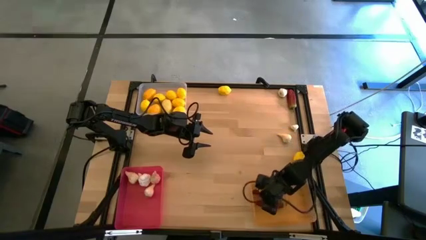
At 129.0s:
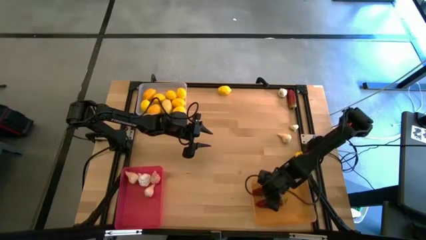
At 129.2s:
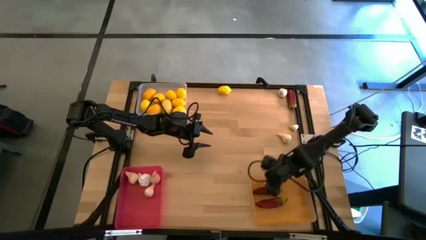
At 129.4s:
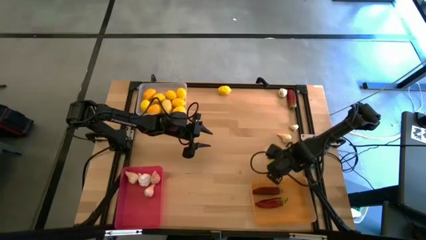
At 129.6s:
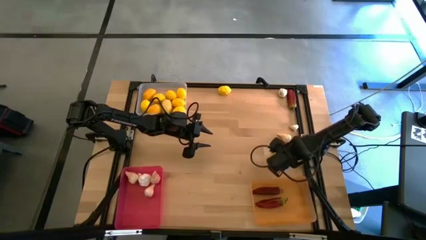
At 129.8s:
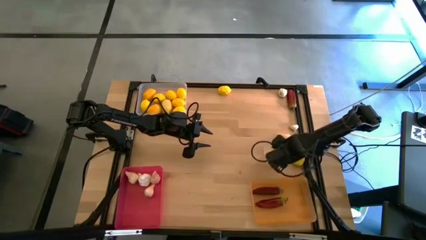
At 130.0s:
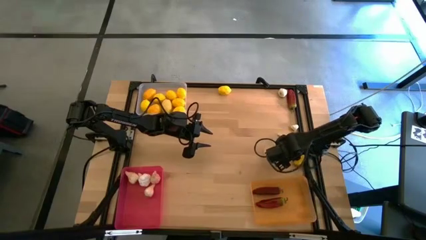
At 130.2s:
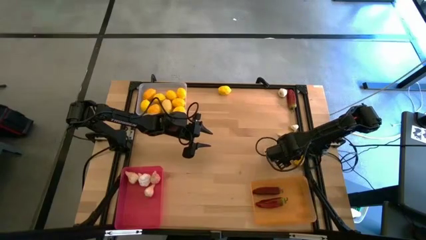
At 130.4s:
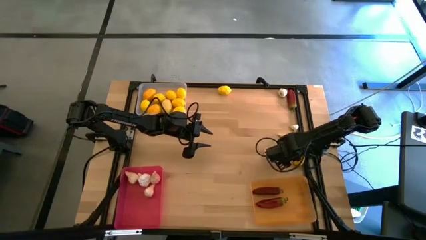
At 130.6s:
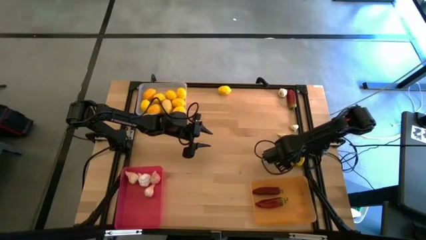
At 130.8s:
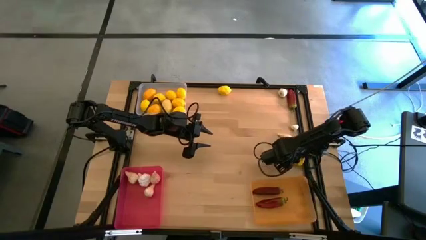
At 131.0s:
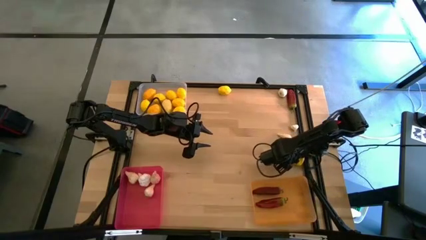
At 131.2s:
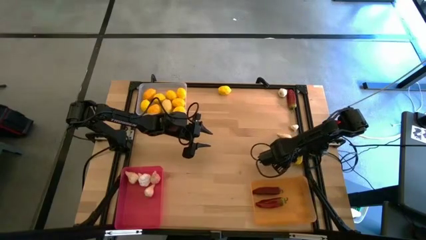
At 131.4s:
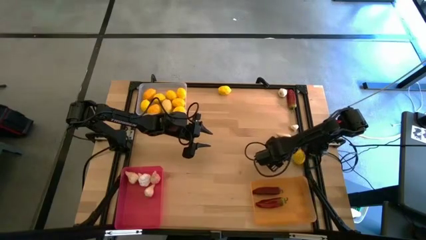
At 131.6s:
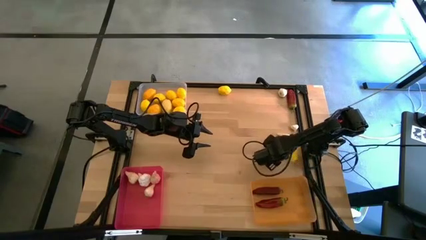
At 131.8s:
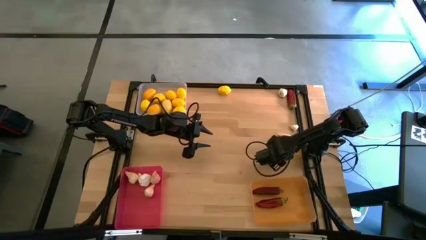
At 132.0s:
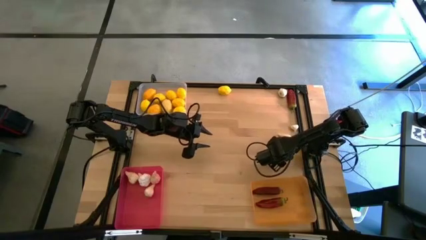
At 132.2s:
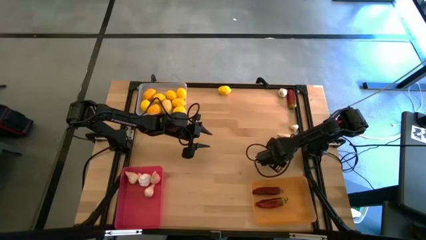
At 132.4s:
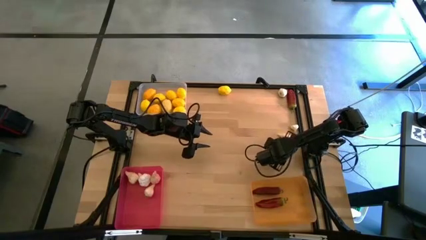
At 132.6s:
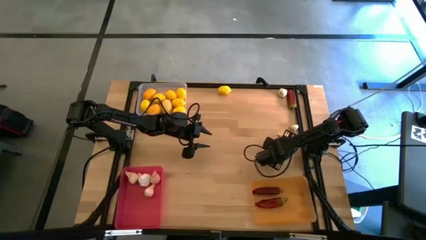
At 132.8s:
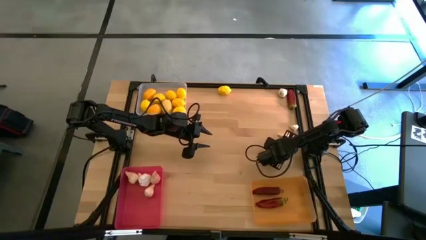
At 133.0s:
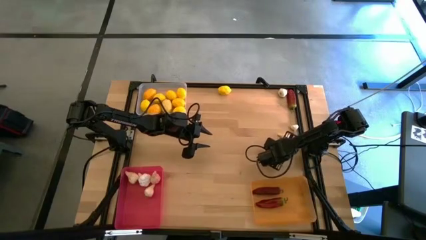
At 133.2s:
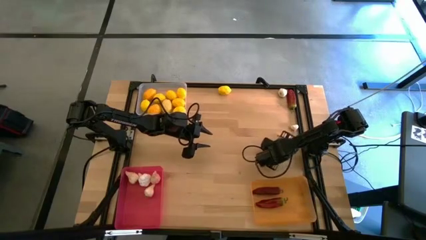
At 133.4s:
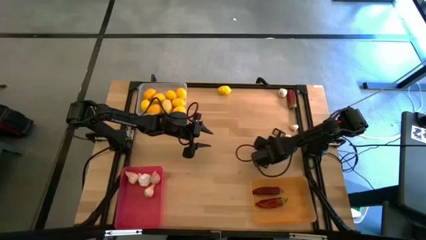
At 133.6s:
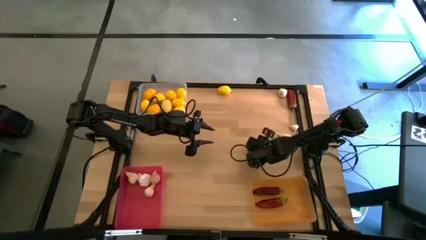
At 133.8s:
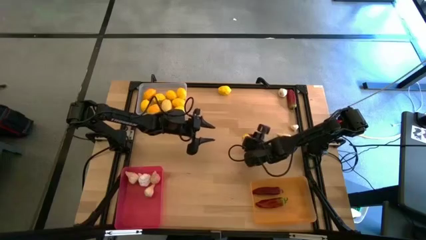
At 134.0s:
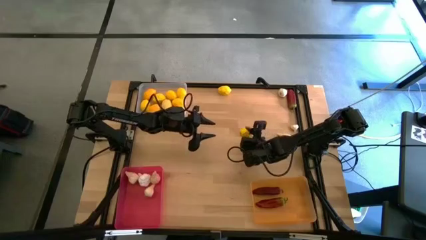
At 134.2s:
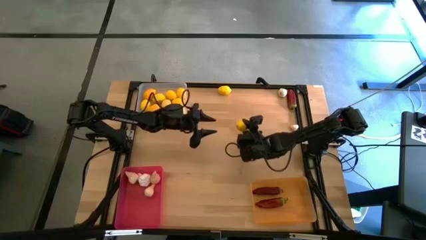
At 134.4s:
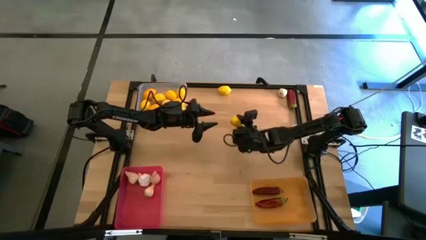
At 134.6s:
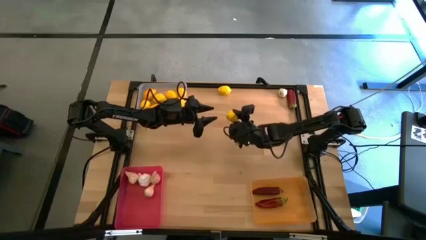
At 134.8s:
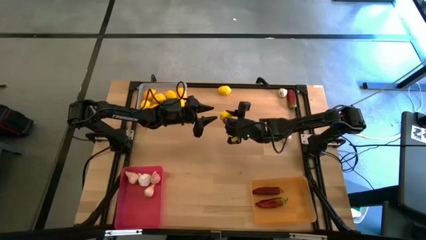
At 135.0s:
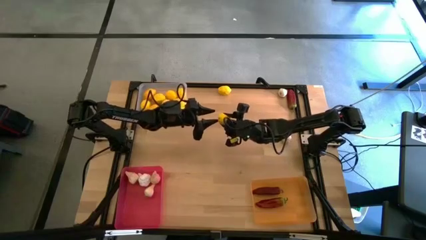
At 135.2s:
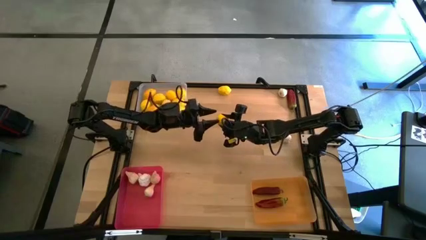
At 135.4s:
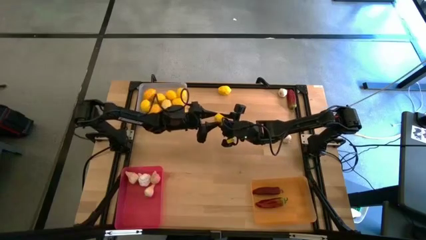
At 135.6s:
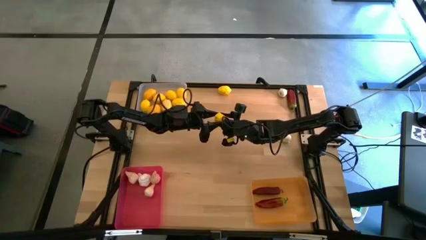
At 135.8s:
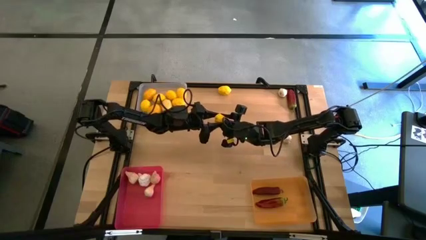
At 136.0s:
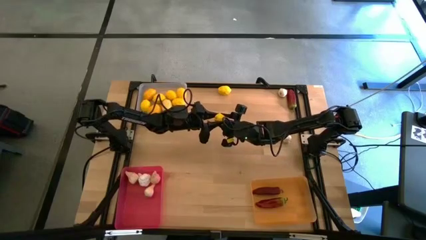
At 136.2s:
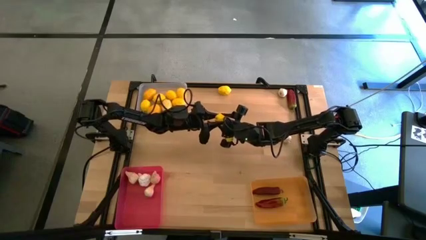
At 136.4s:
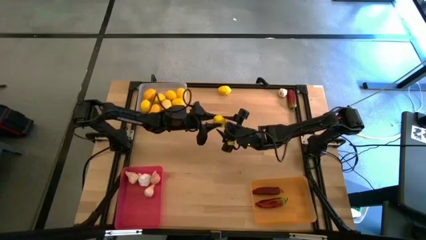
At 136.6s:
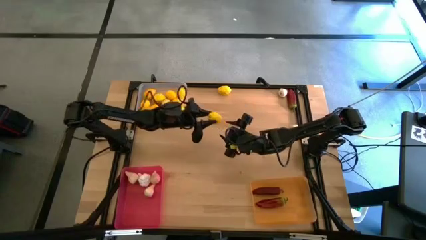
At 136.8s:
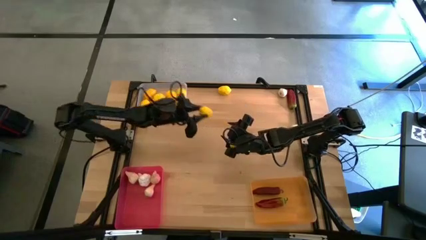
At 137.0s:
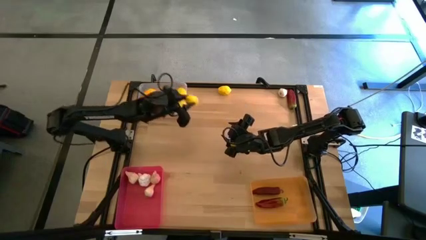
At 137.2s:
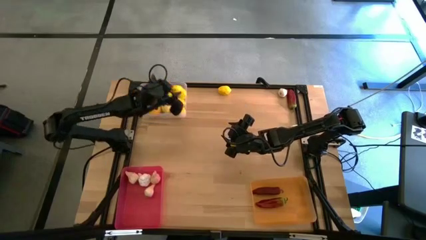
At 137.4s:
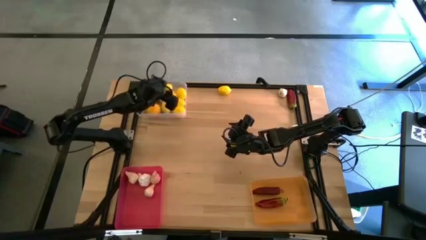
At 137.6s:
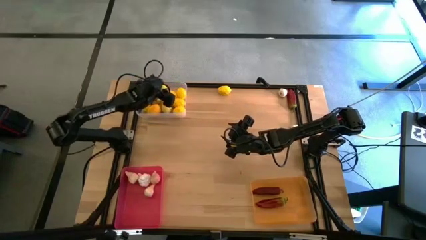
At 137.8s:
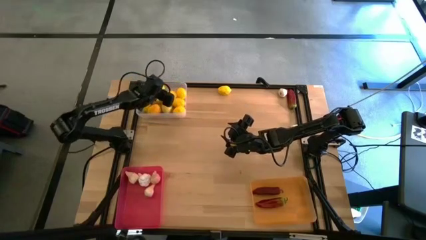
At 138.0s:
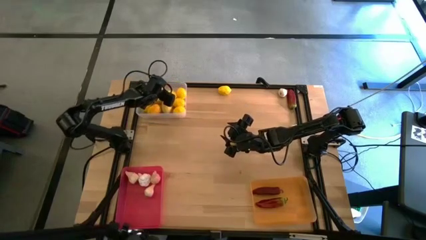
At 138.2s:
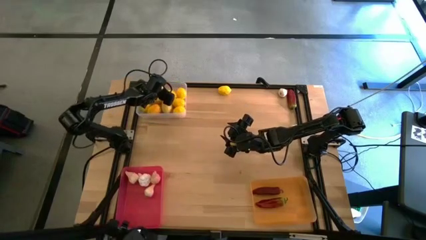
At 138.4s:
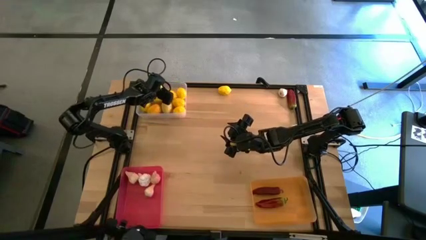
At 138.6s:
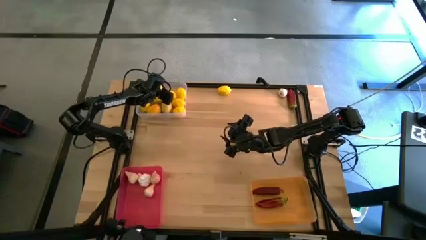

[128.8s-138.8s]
Task: Sort produce into baskets
Put the yellow lemon into the left white bin

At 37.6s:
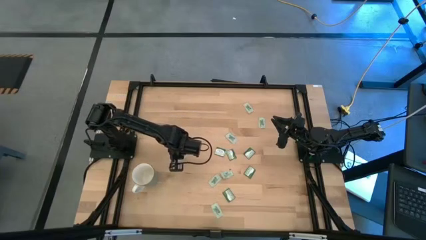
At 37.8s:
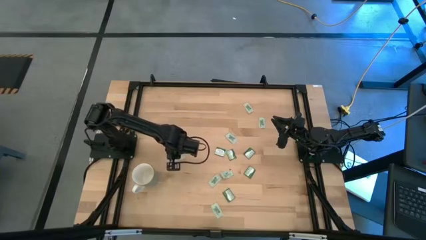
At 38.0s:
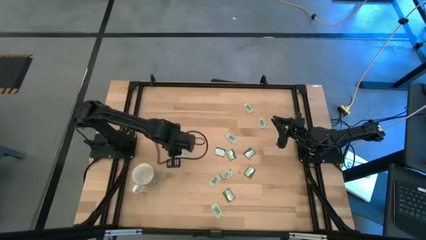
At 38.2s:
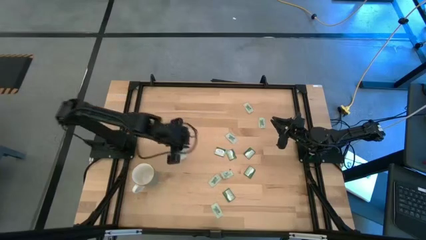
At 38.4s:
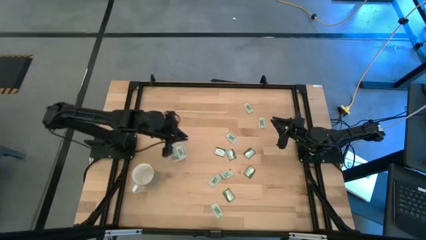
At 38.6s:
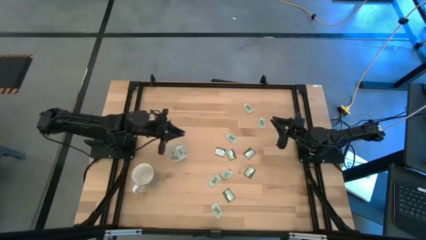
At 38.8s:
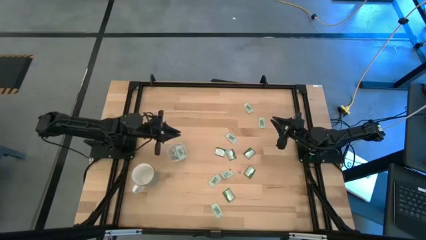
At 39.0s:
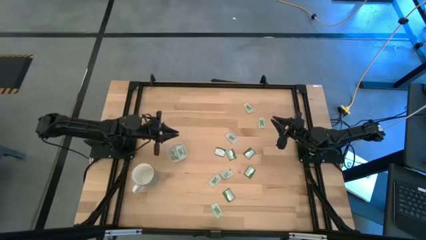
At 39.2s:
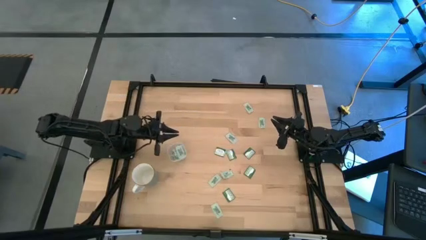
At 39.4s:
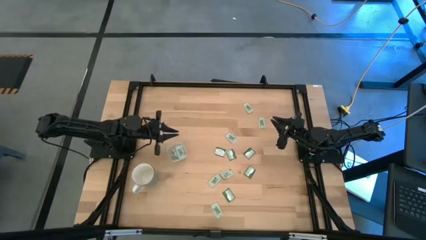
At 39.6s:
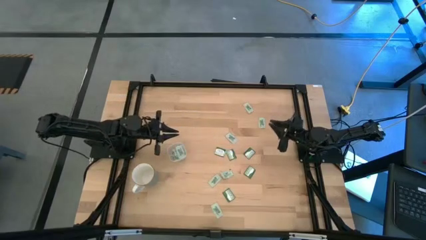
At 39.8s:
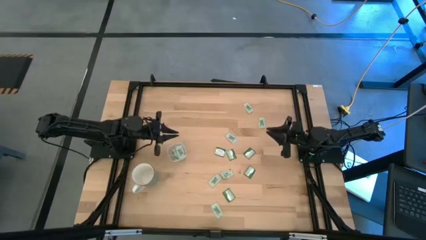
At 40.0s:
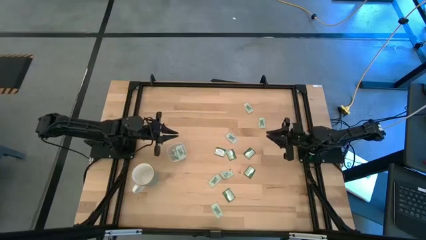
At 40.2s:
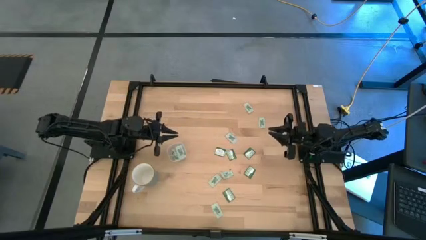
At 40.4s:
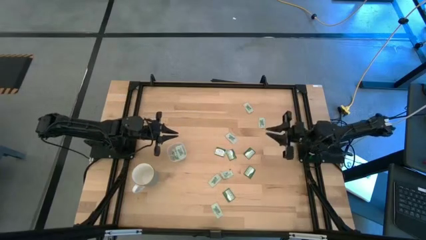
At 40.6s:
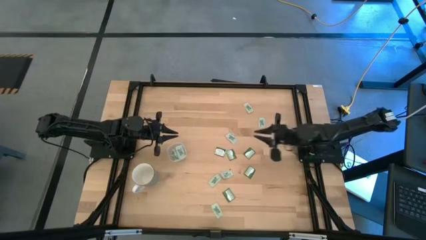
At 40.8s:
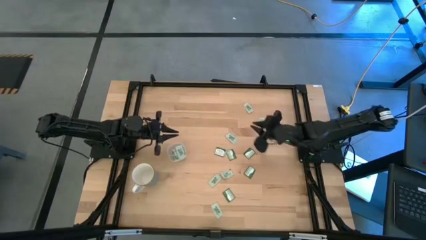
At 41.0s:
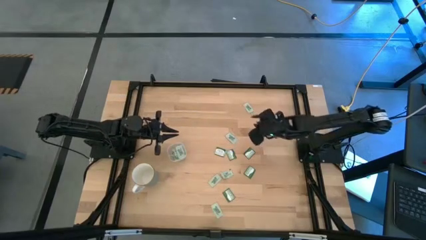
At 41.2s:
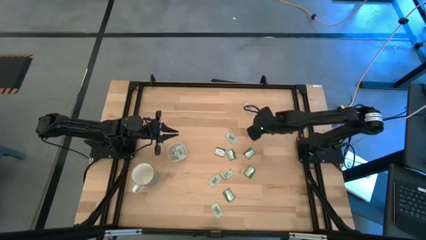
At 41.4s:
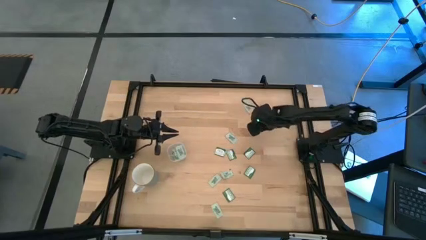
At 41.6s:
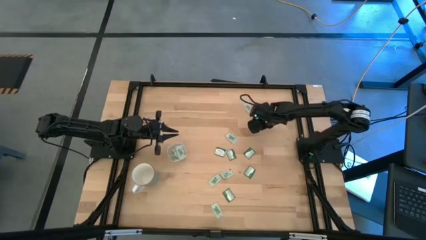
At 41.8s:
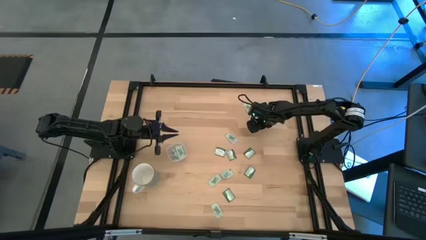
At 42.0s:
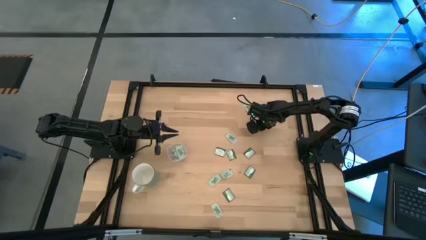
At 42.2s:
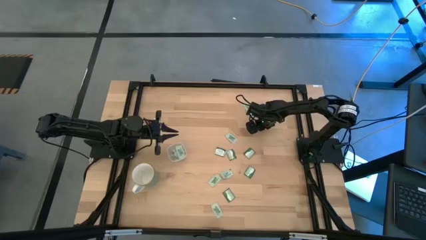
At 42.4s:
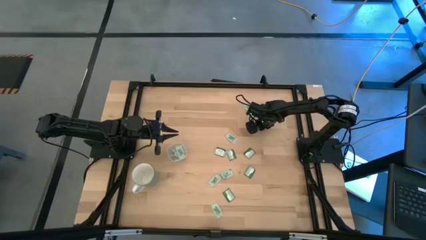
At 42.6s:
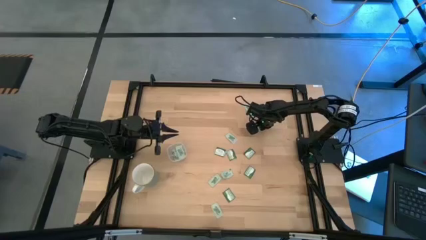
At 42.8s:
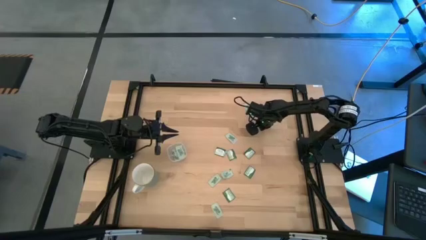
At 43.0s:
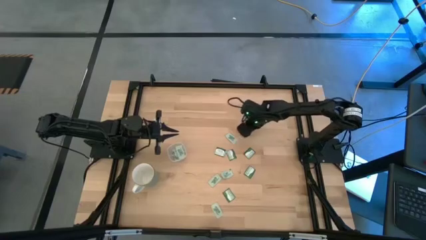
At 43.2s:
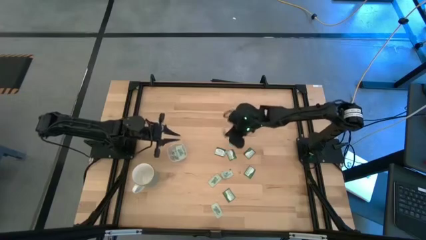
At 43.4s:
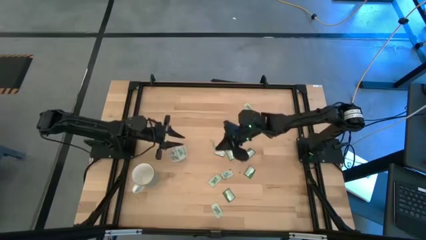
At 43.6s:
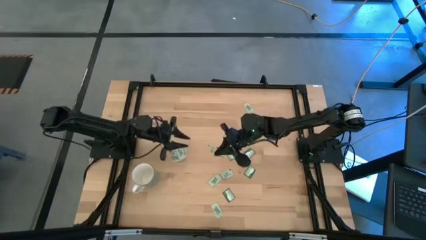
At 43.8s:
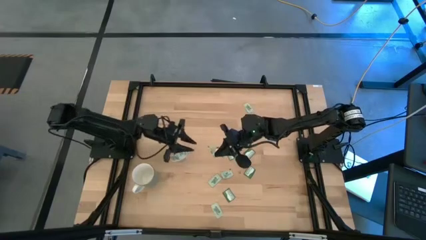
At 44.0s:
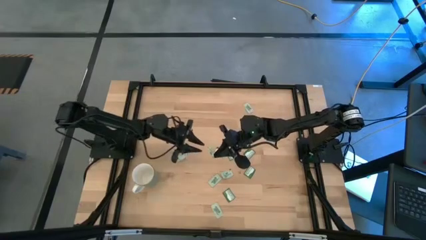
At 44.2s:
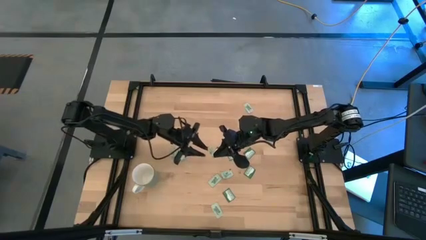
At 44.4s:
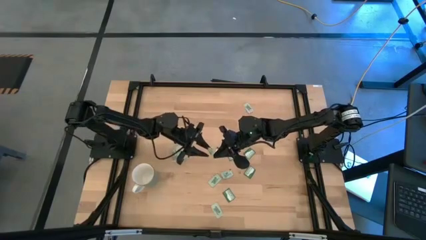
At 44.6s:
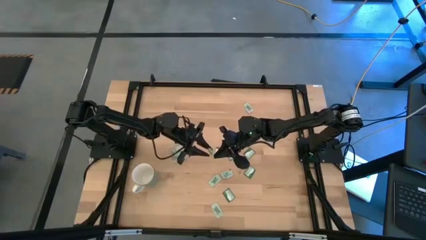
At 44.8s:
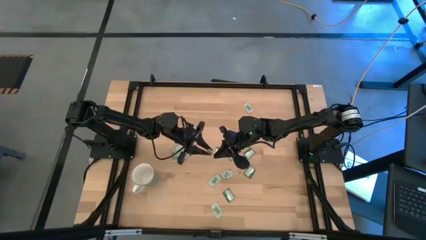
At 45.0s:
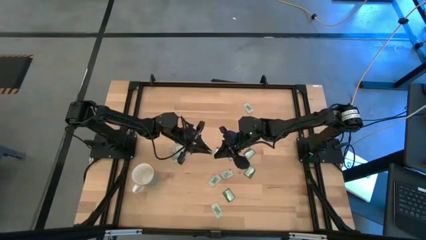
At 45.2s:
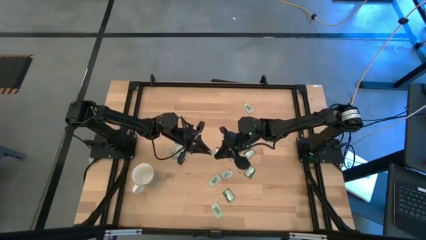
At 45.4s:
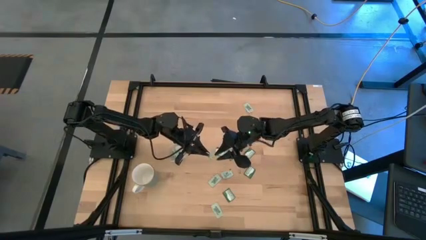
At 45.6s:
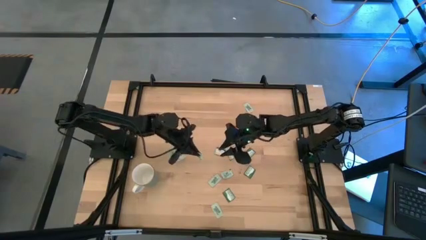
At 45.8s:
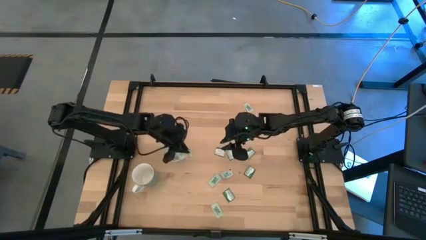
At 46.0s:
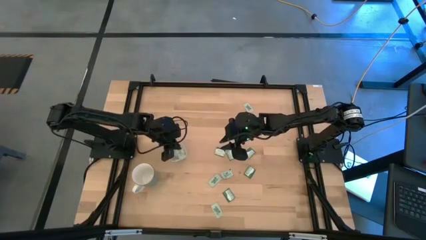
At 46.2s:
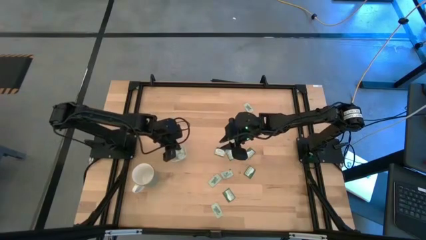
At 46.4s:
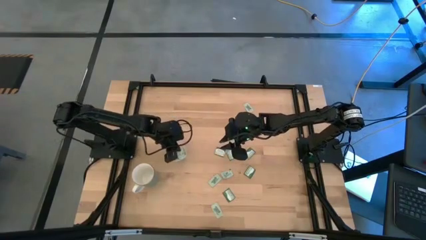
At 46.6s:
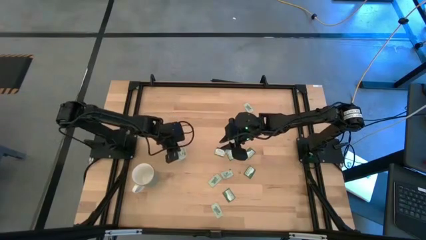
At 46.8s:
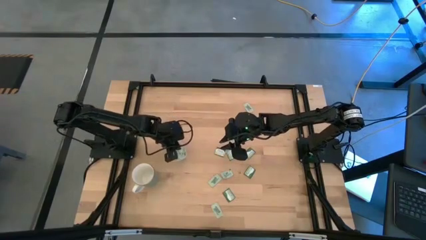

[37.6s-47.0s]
Task: Pick and place Stevia / Truvia into bins
Put the green stevia packet into the transparent container
